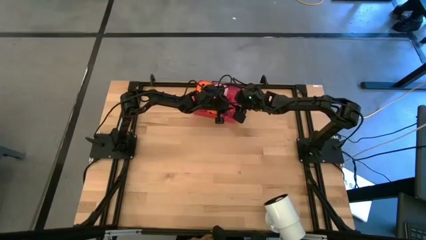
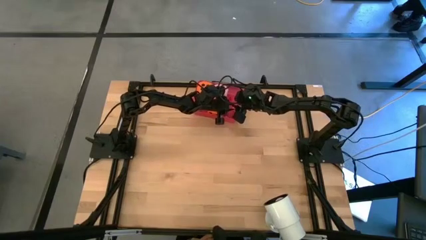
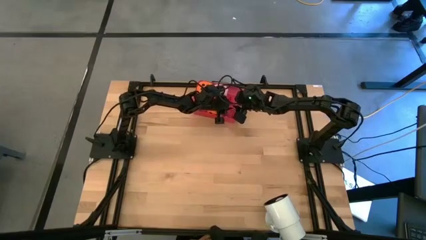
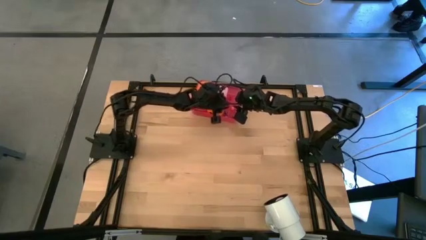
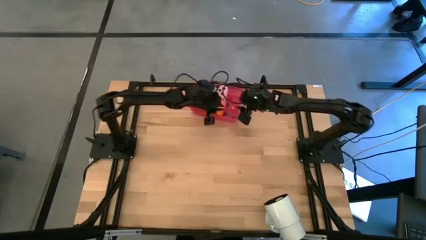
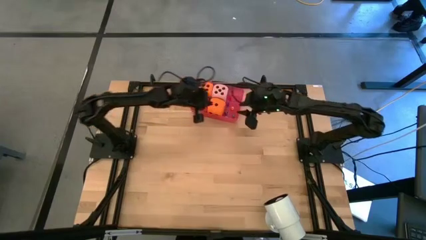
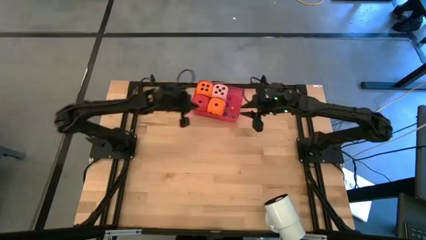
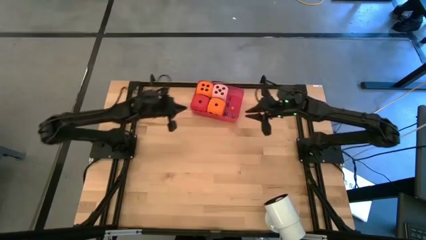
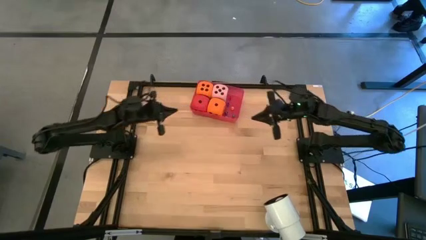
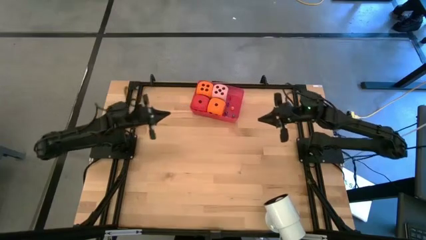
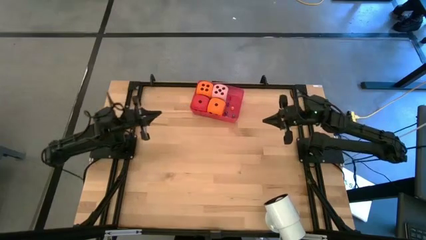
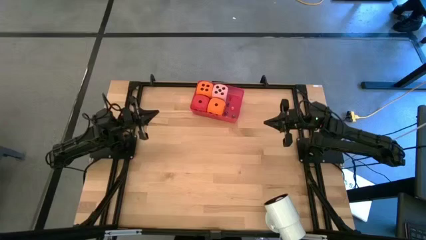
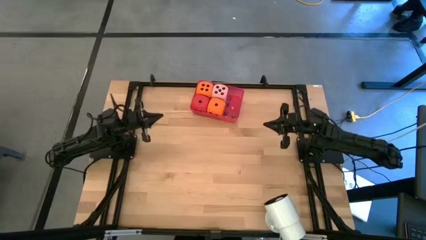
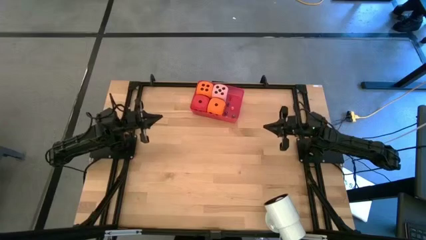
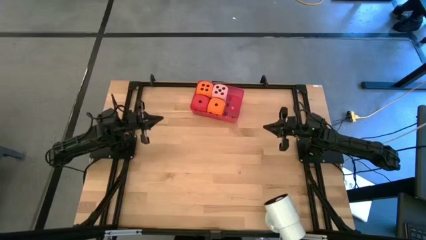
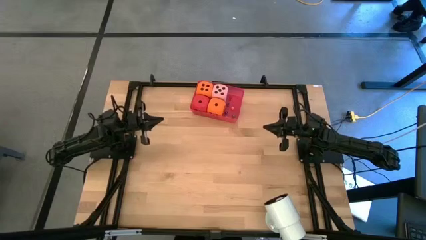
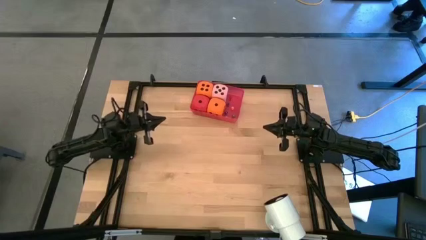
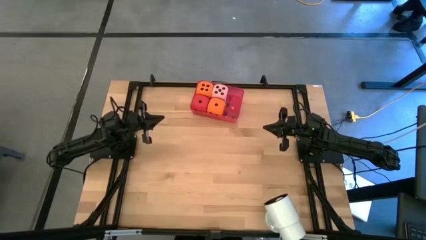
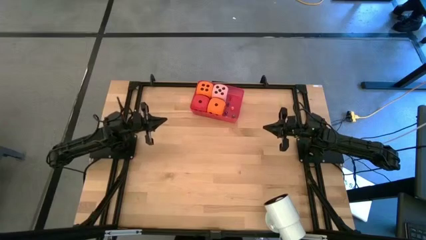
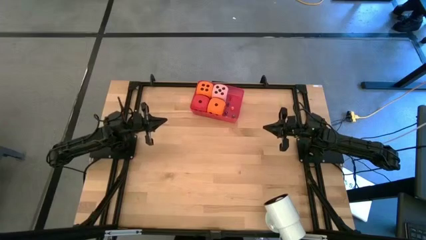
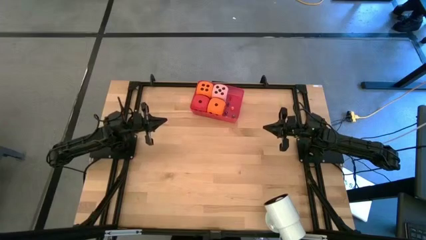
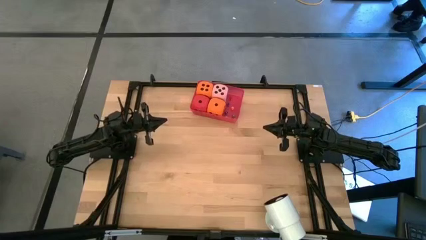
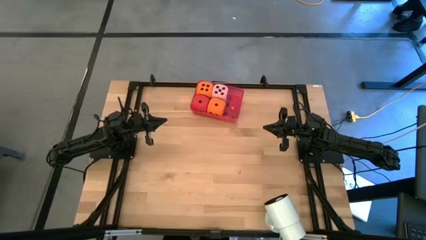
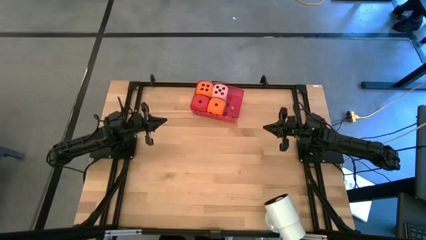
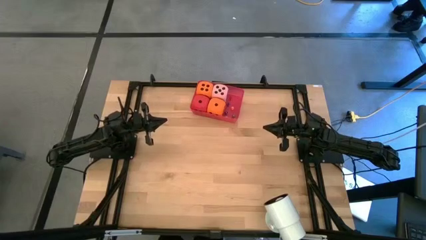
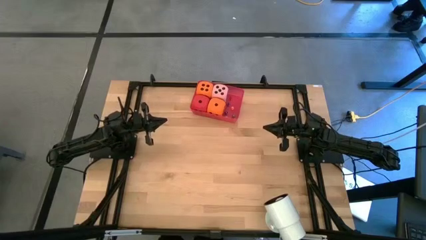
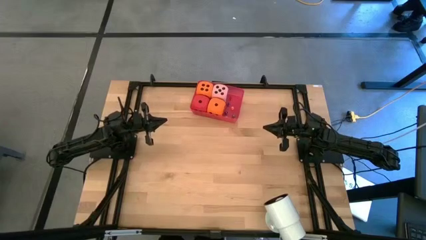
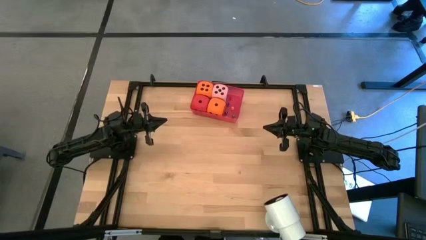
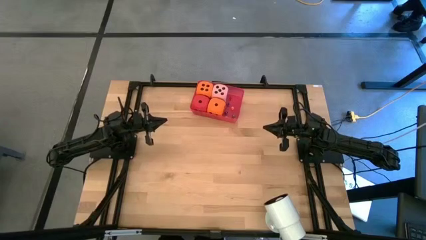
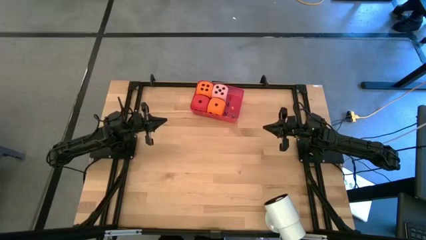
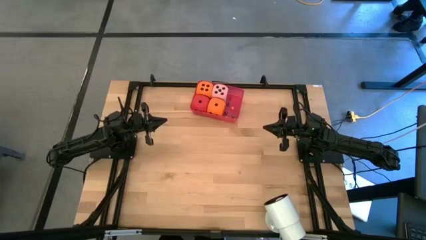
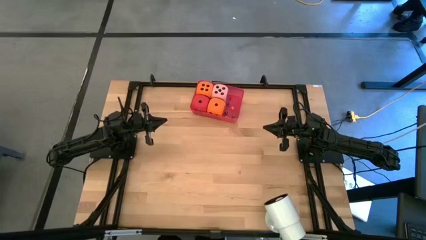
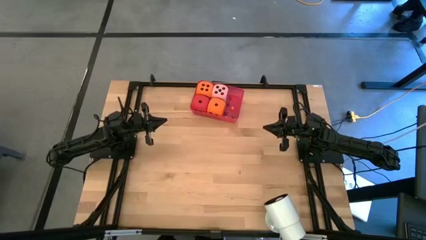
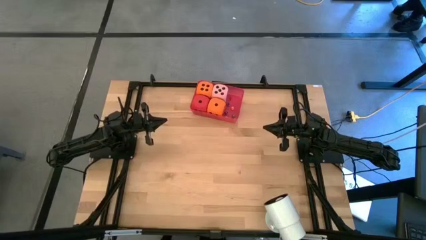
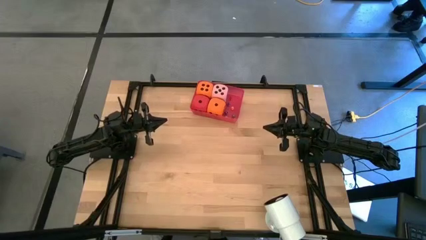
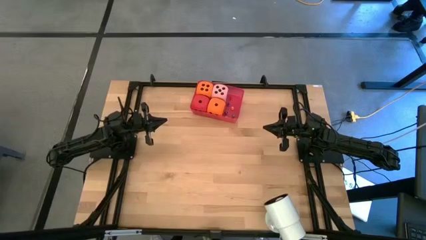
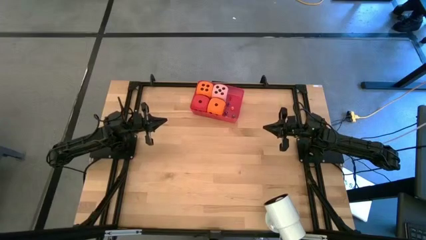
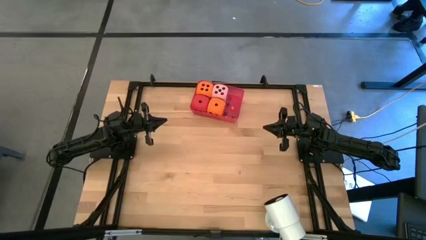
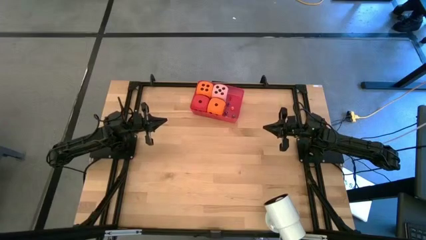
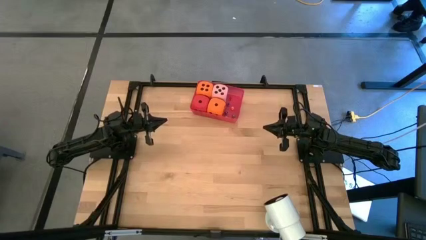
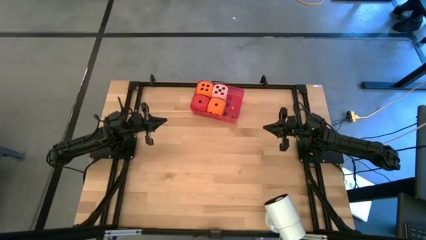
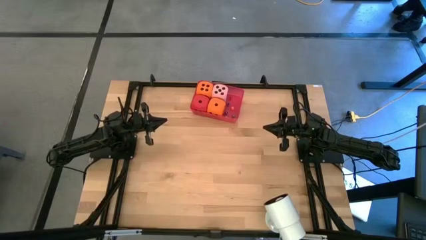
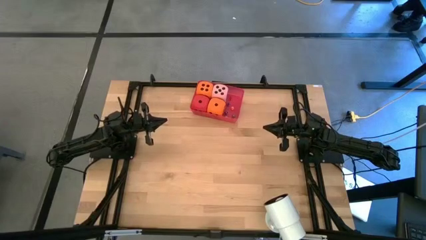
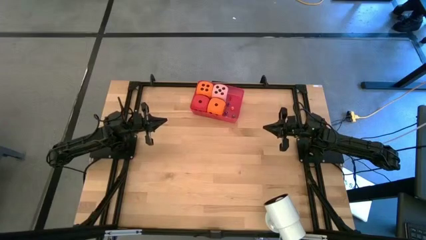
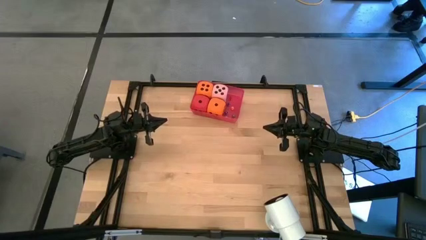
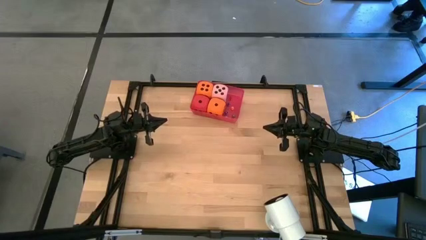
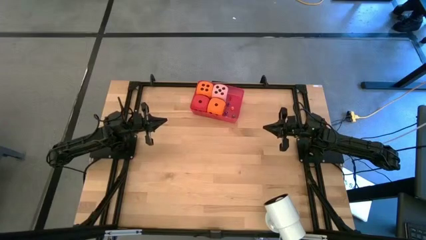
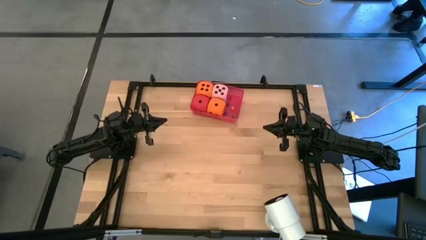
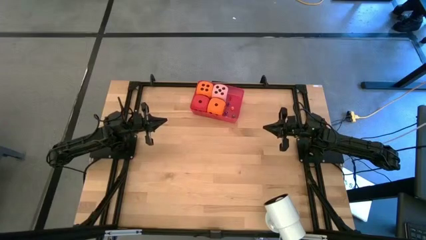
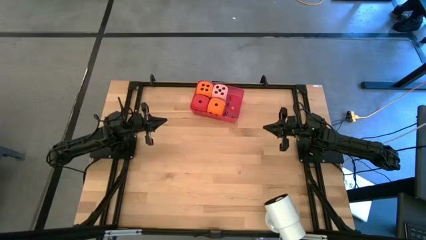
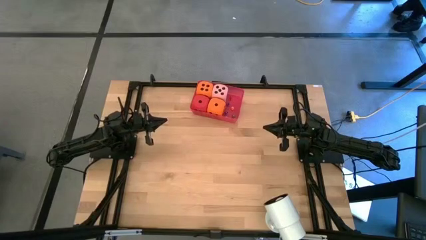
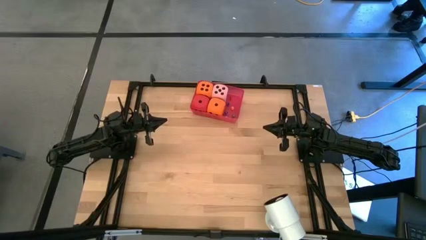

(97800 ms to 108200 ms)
Task: Pick & Place Dice
Return to Home Position

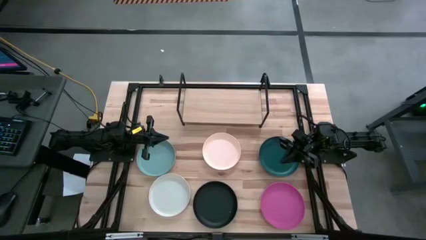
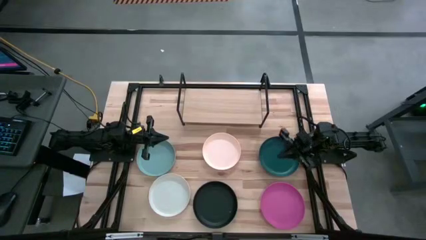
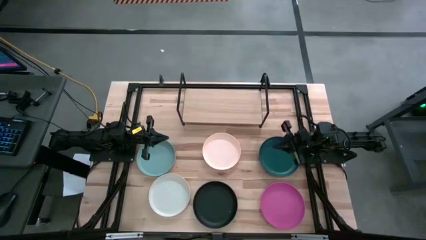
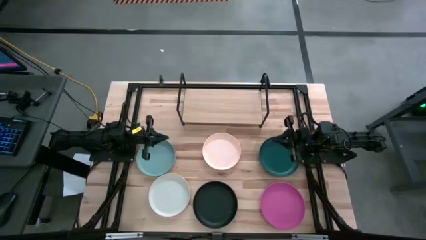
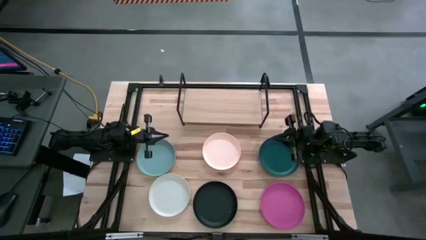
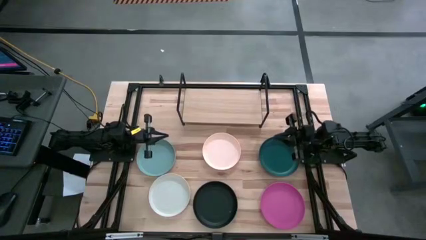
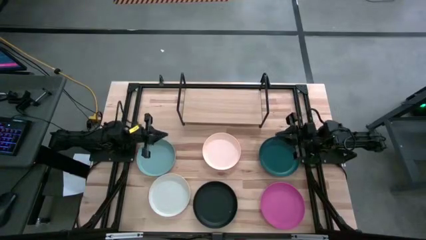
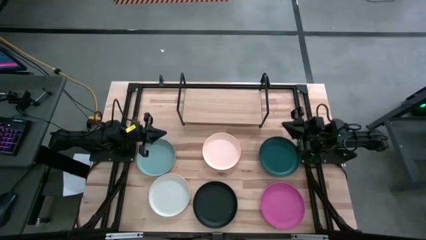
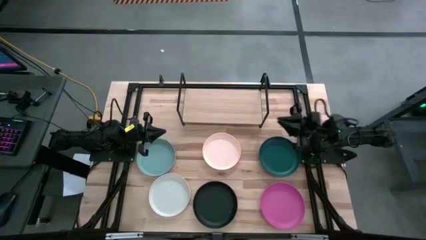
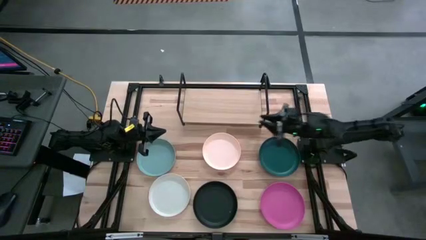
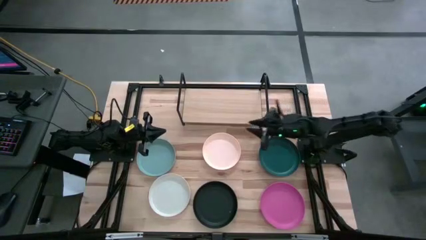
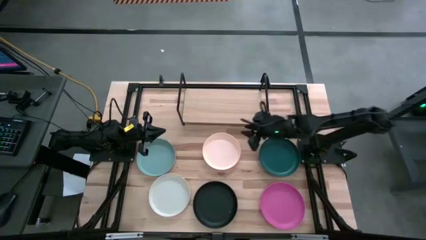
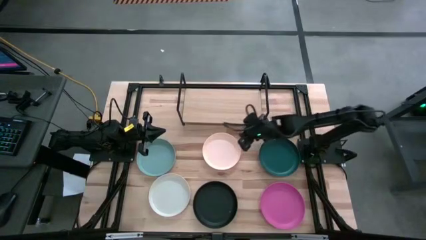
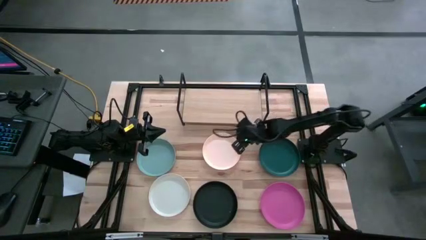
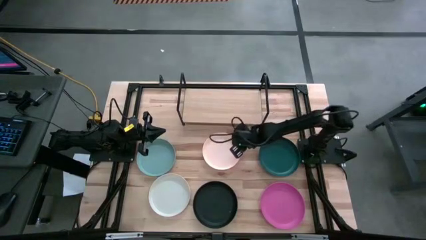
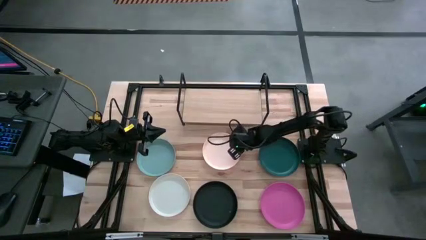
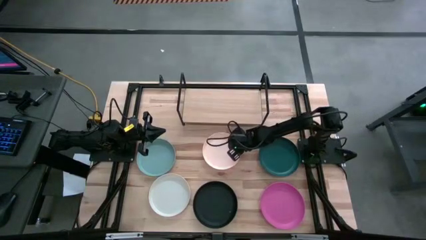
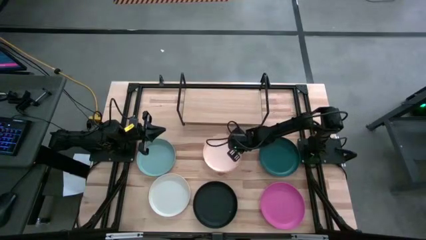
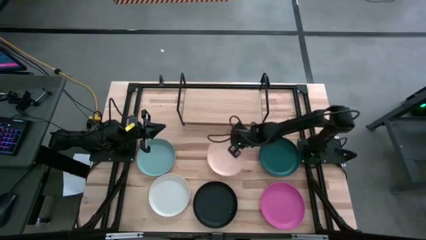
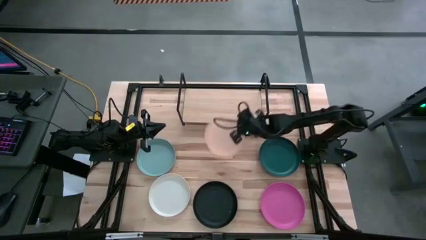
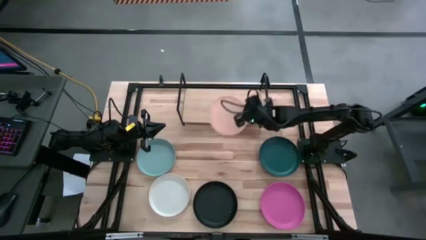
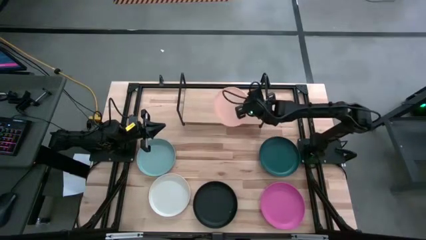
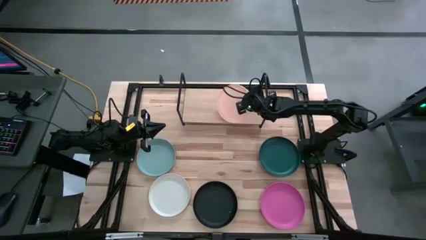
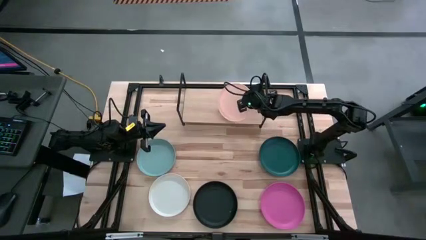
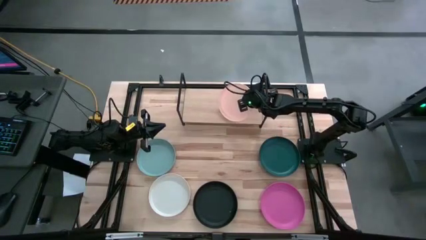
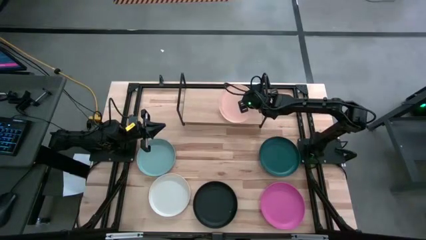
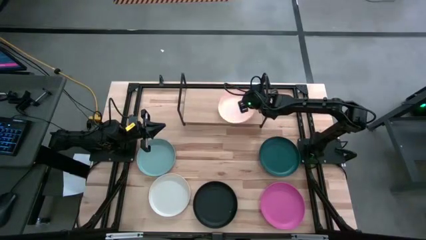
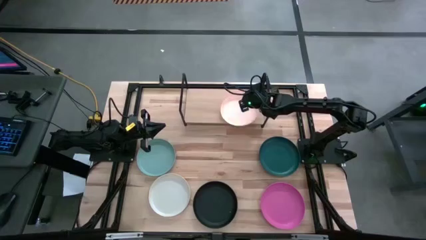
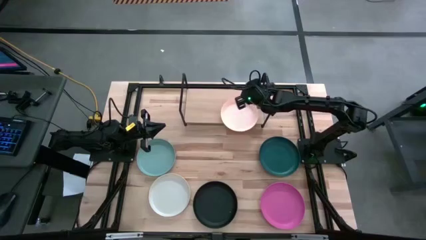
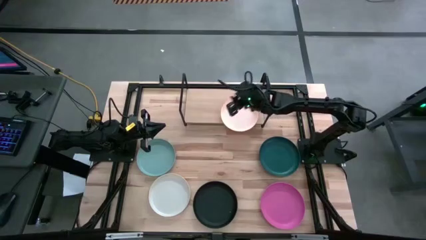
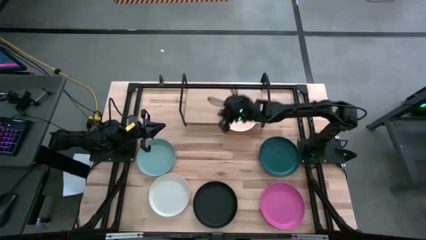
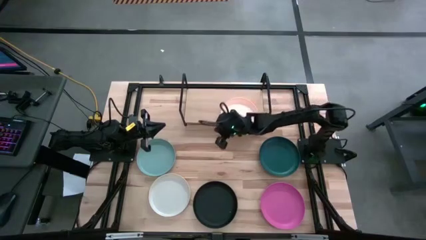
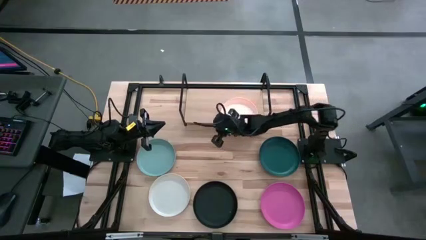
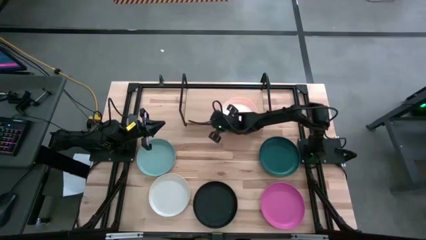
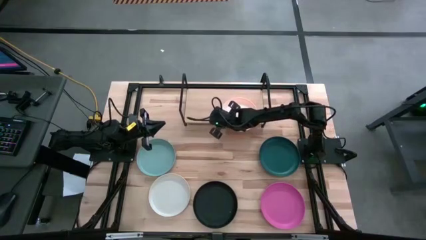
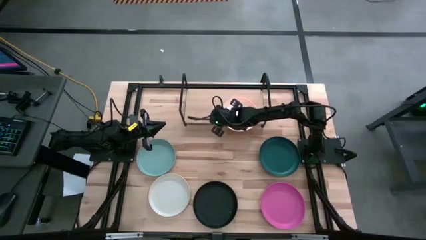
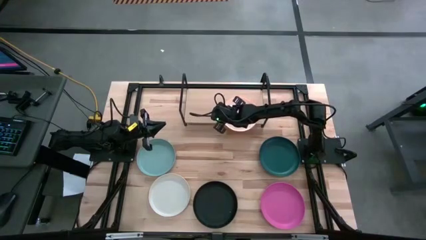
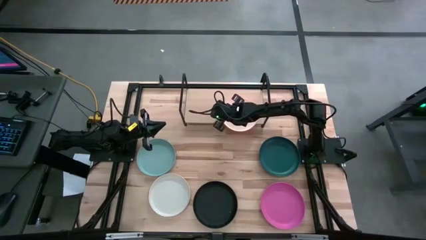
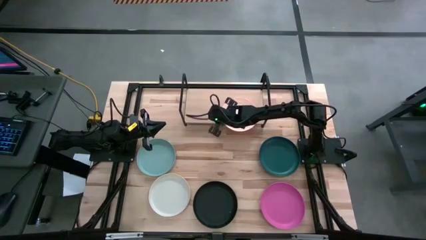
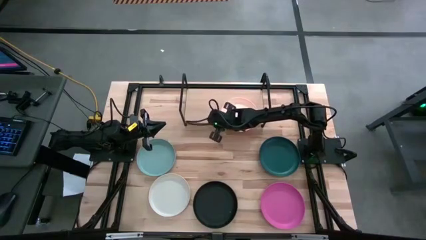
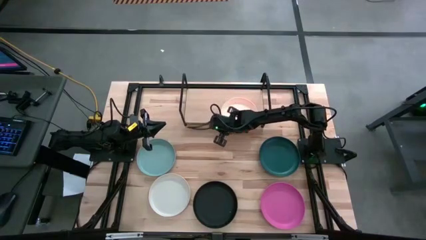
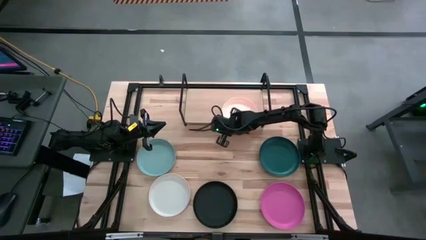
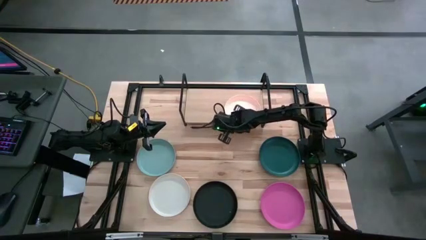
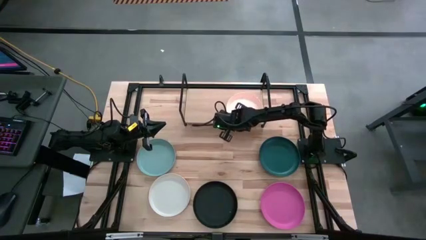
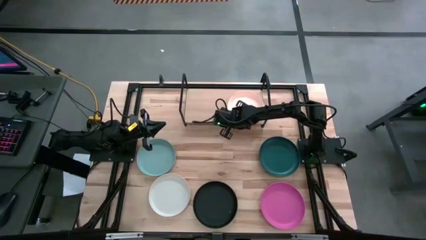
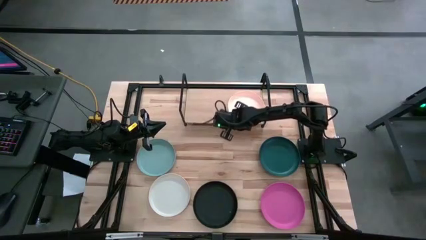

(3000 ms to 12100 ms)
Task: Place and stack plates onto a shelf
Put the light orange plate on the shelf
